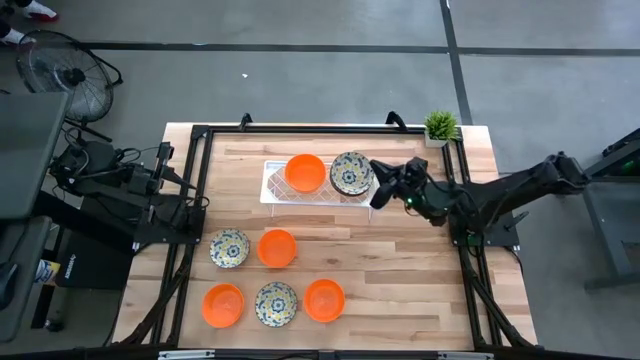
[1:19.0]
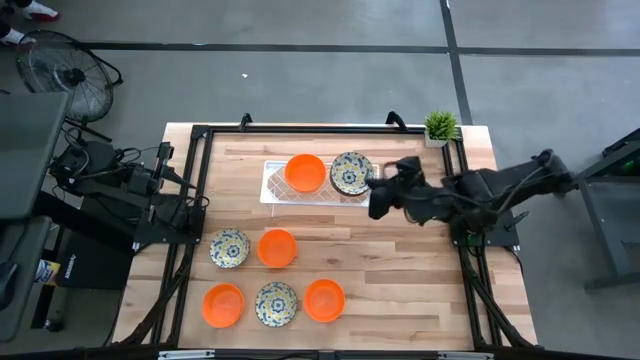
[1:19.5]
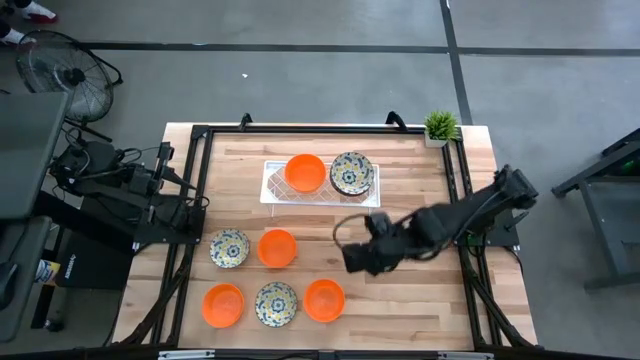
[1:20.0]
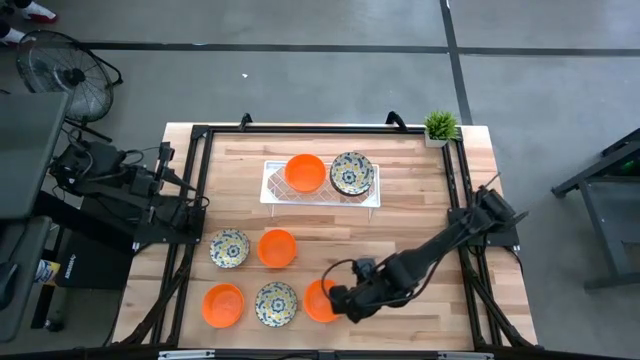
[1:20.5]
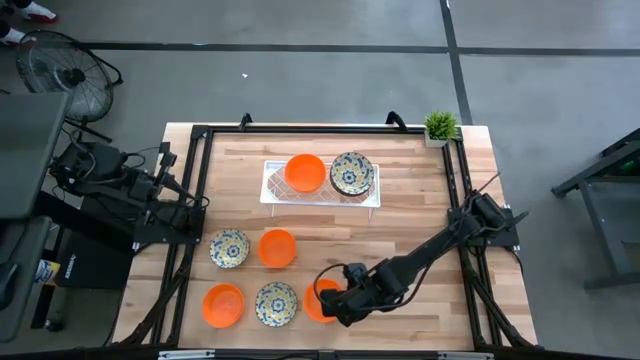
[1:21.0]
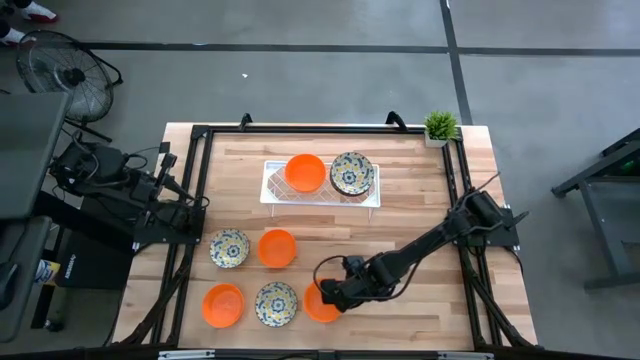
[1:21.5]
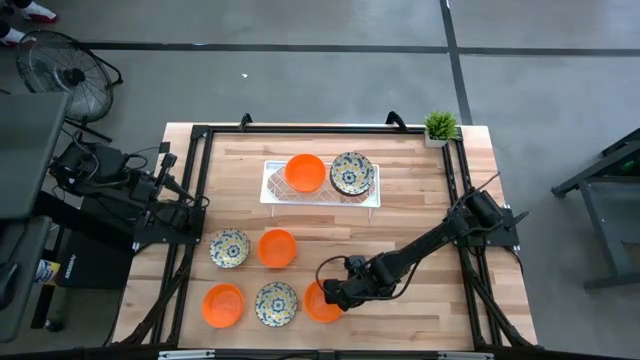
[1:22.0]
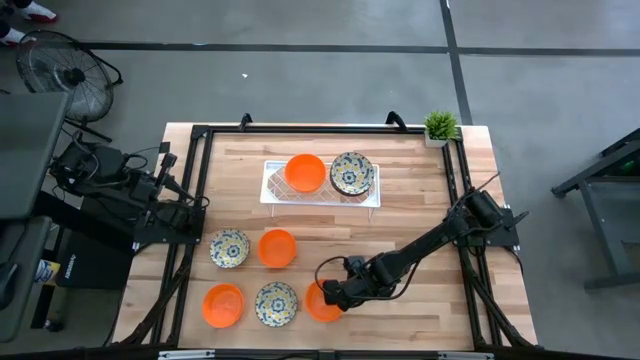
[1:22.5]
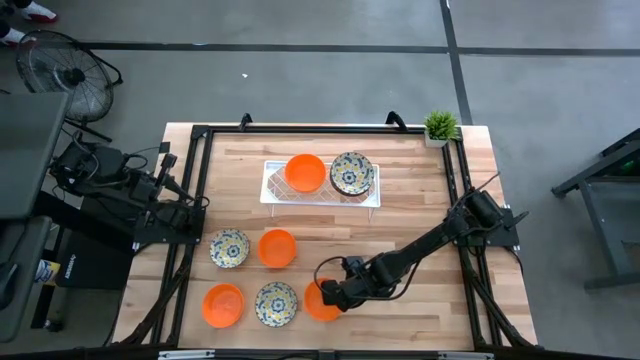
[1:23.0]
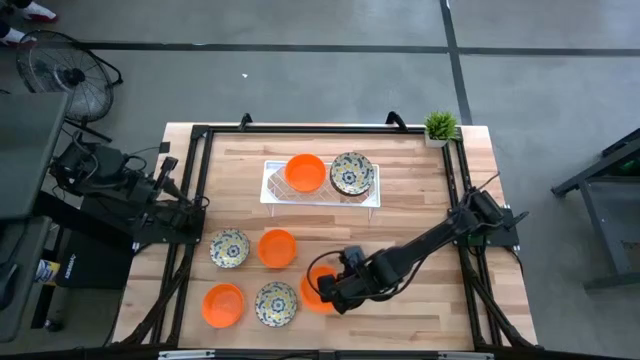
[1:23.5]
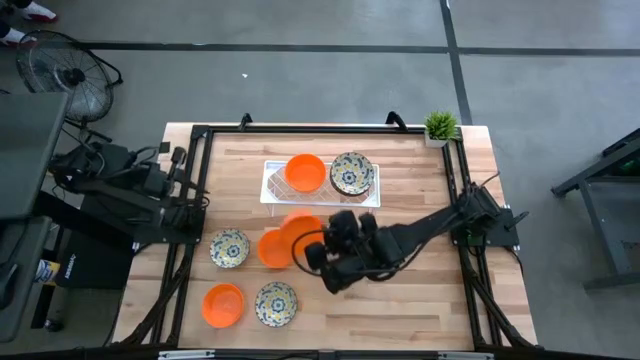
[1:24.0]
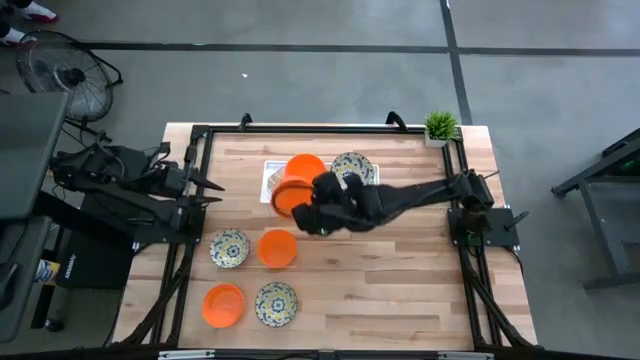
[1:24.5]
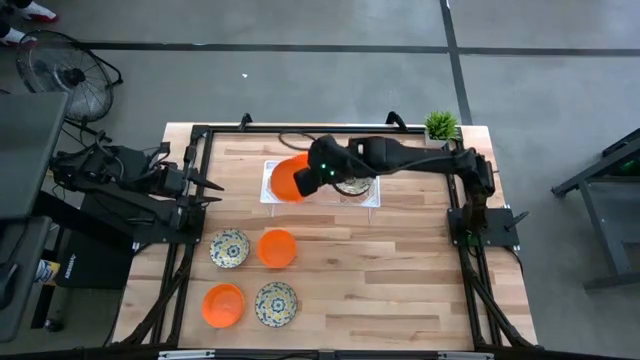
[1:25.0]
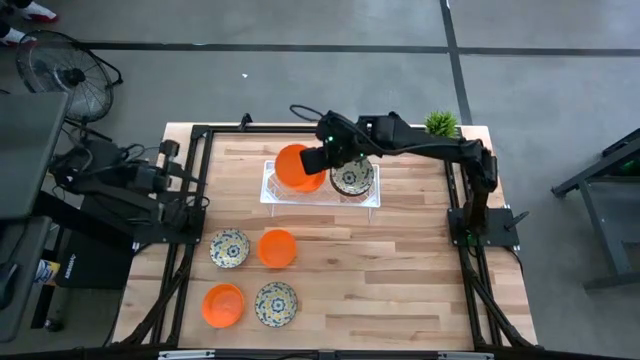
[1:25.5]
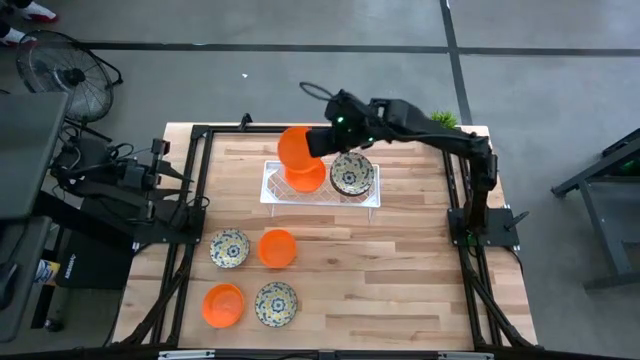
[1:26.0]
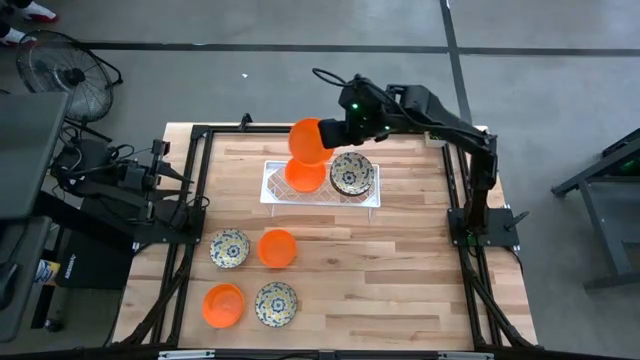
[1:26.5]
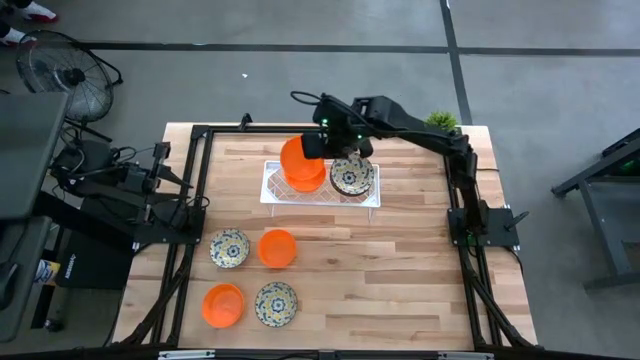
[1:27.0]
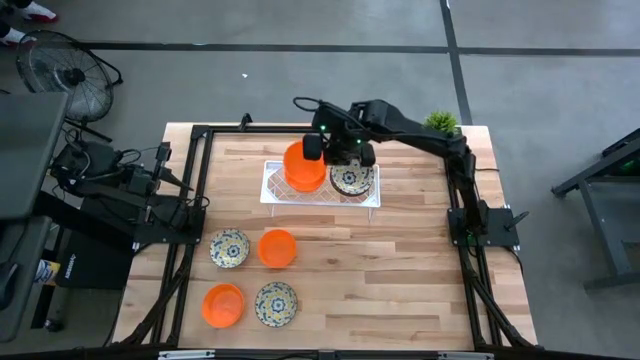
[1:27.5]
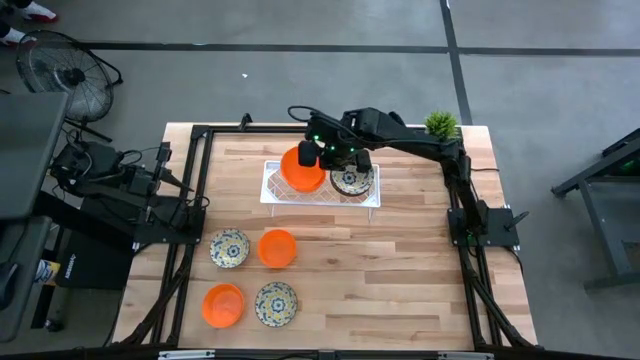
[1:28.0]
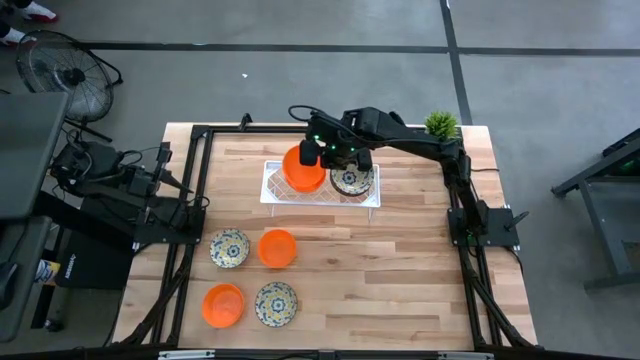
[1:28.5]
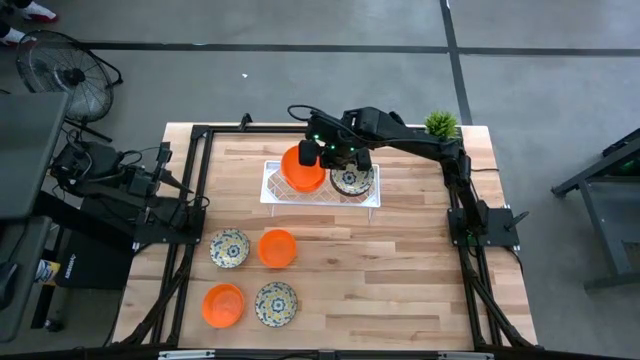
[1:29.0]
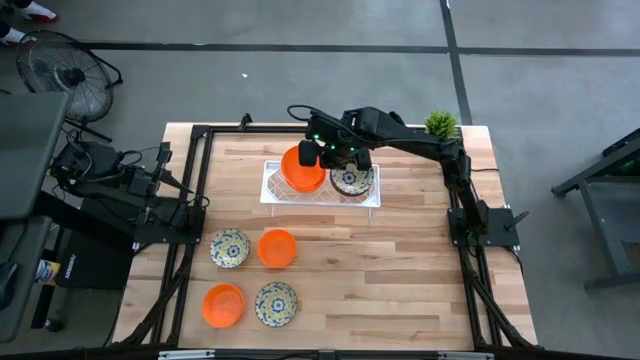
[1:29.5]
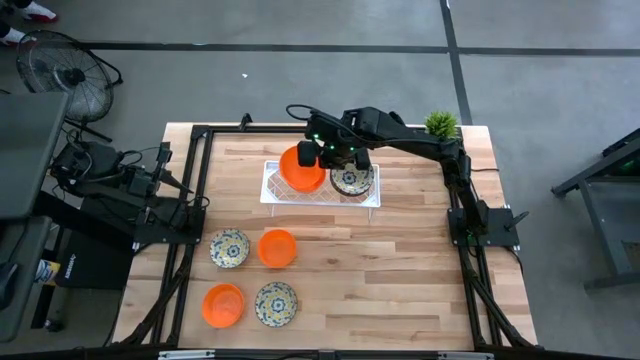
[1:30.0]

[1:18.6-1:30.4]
Task: Pick & Place Mini bowls
Stack the orange bowl on top of the other orange bowls on the shelf

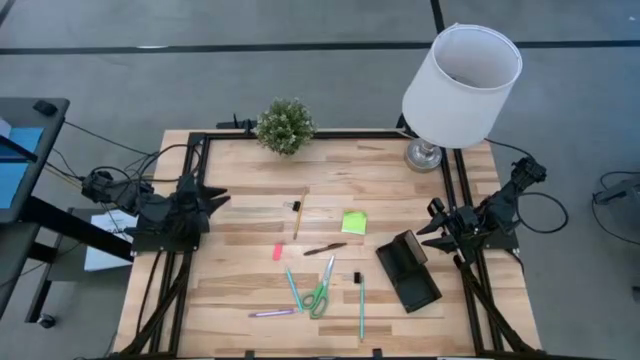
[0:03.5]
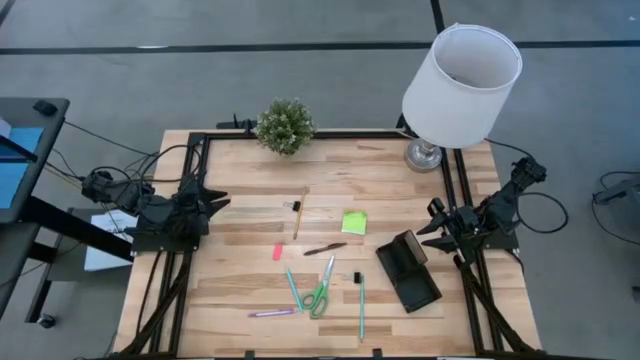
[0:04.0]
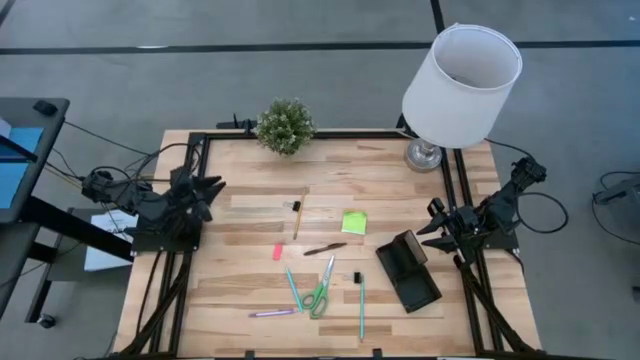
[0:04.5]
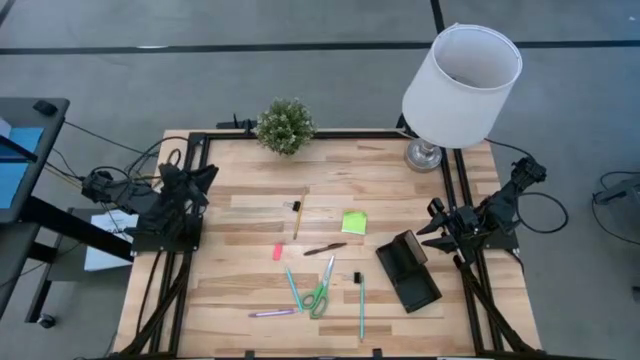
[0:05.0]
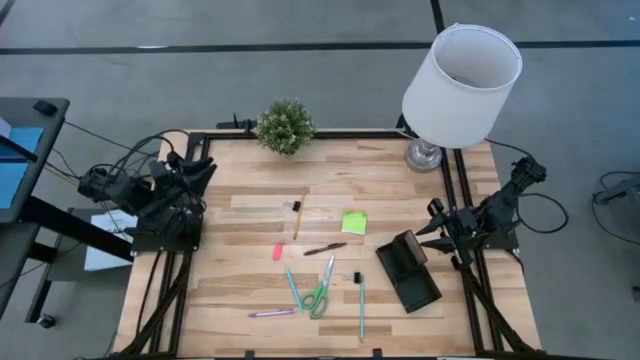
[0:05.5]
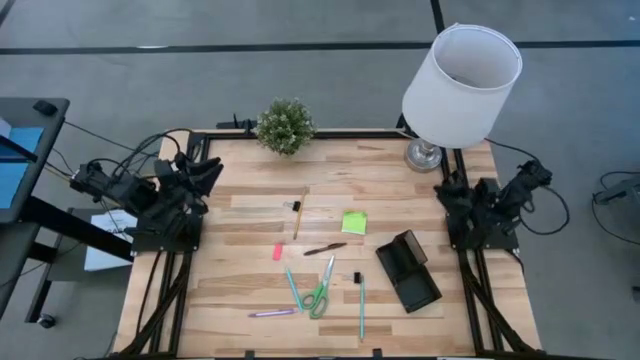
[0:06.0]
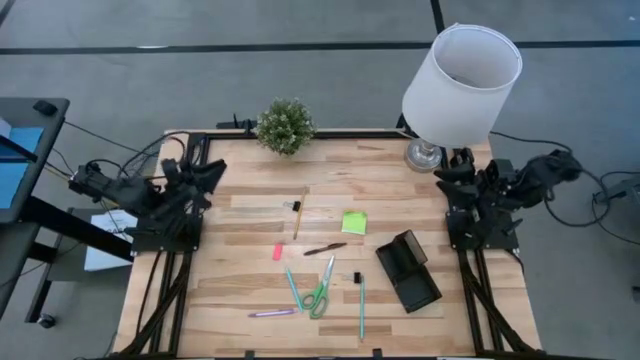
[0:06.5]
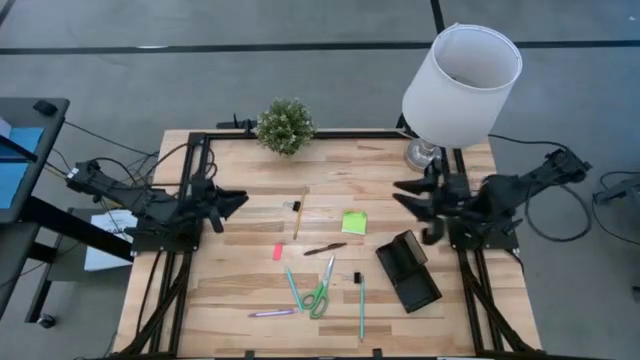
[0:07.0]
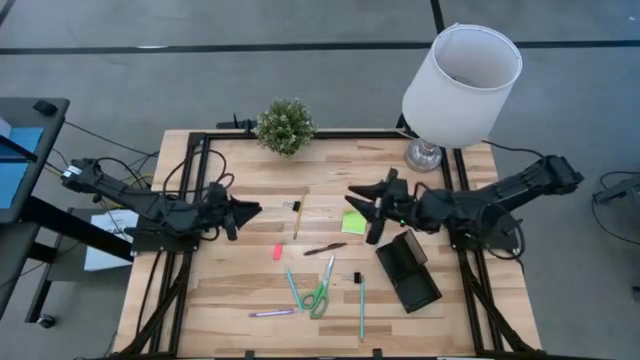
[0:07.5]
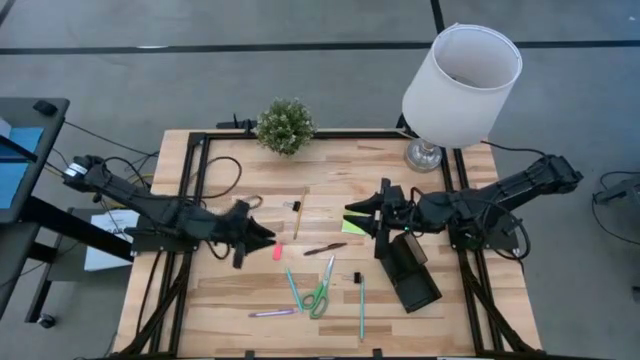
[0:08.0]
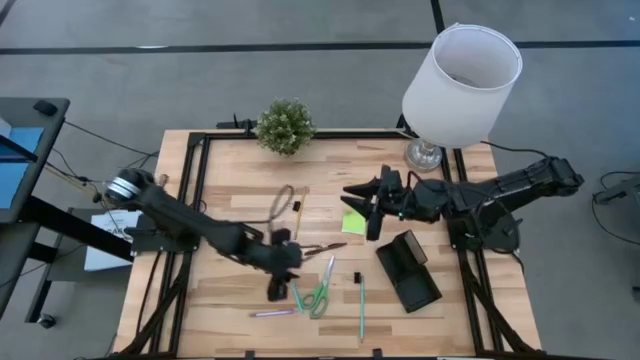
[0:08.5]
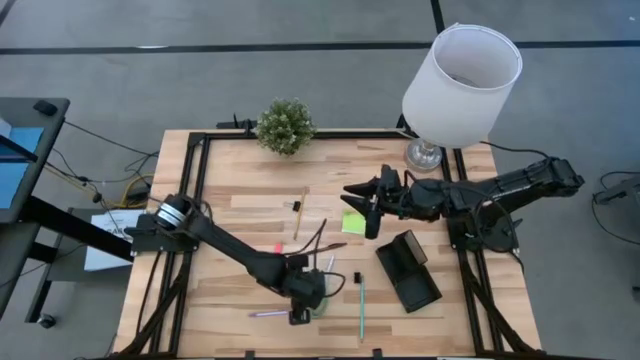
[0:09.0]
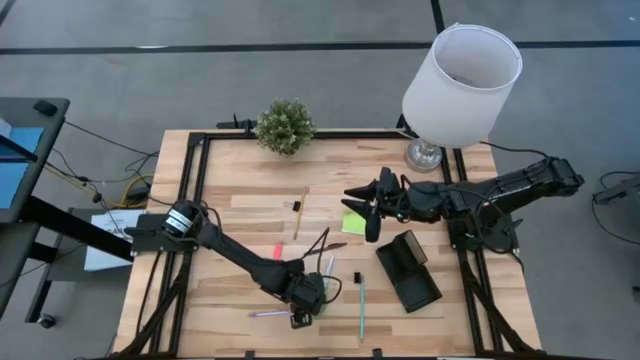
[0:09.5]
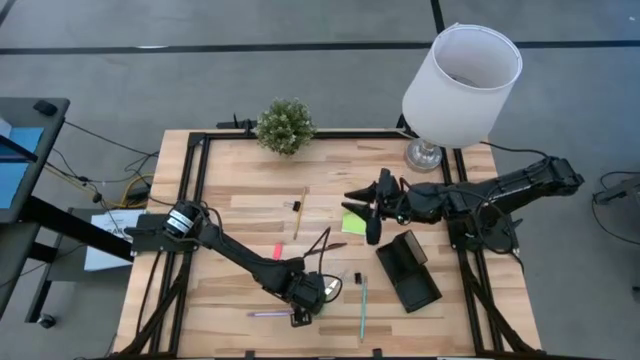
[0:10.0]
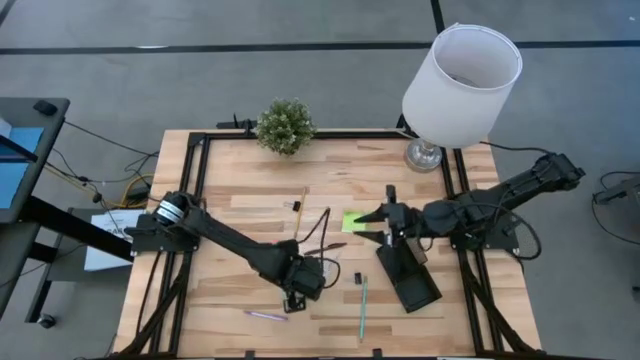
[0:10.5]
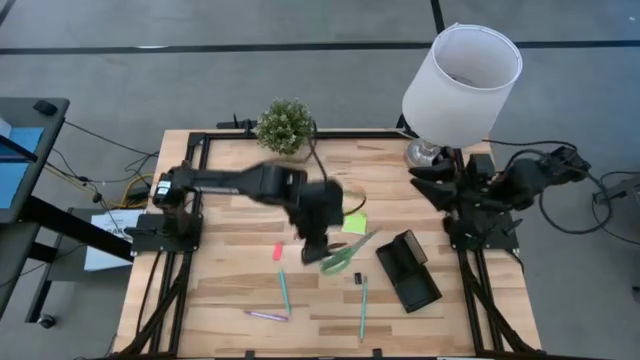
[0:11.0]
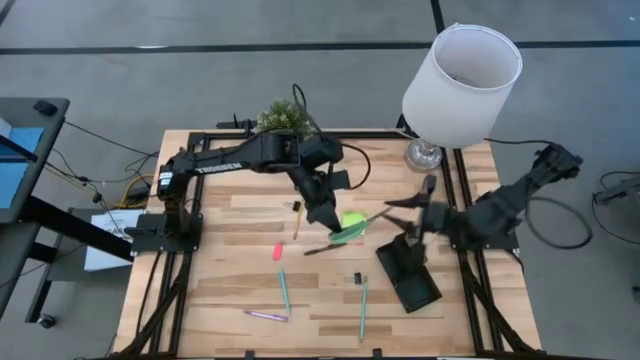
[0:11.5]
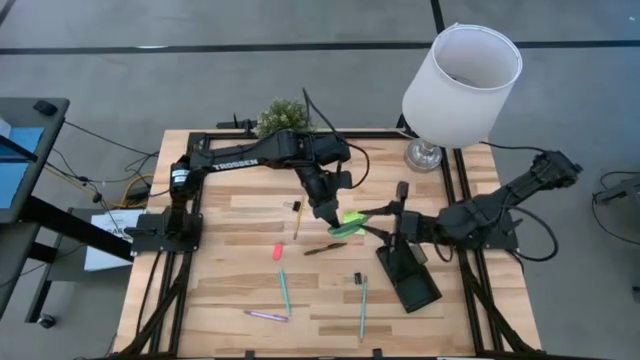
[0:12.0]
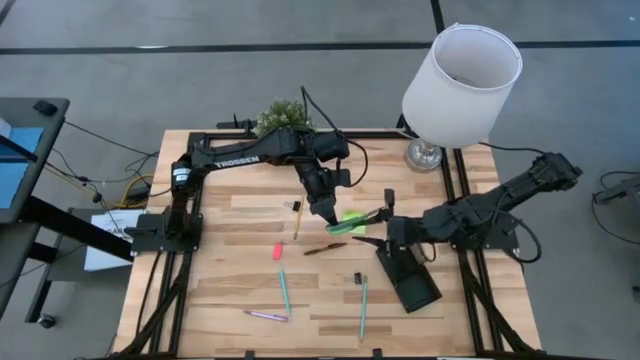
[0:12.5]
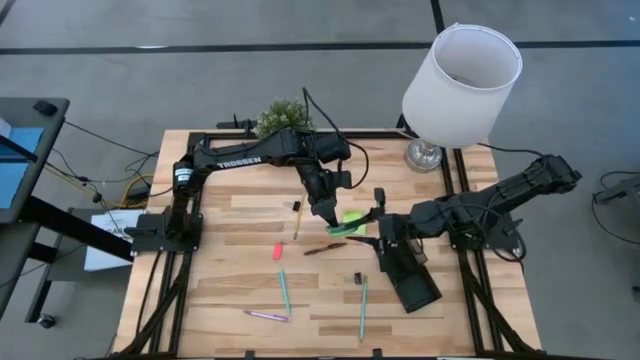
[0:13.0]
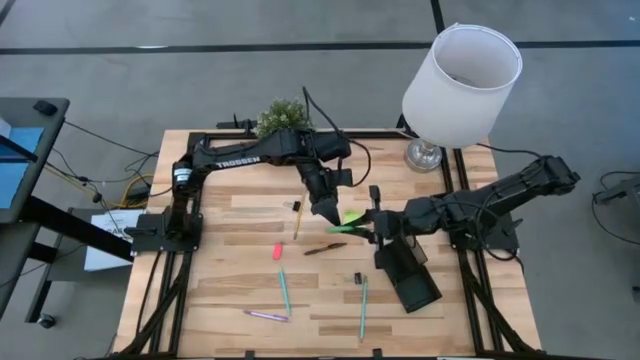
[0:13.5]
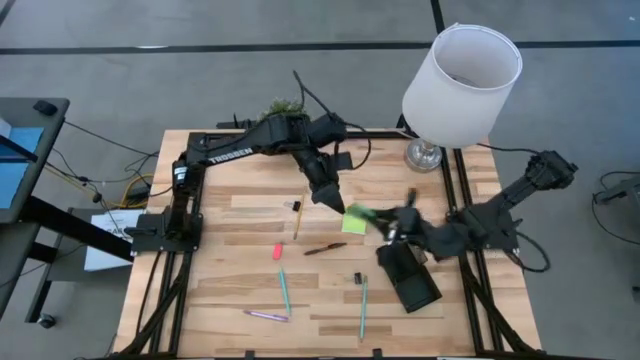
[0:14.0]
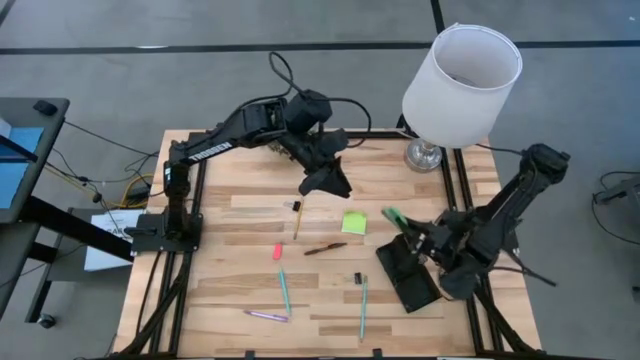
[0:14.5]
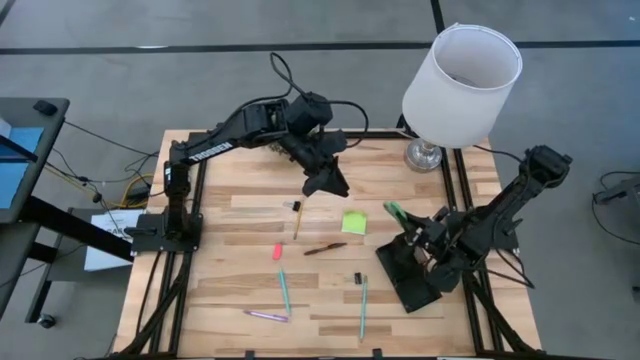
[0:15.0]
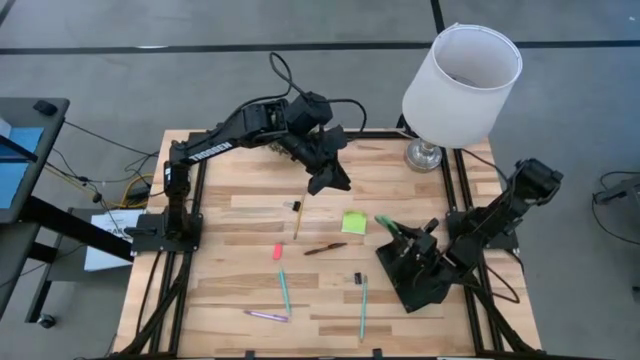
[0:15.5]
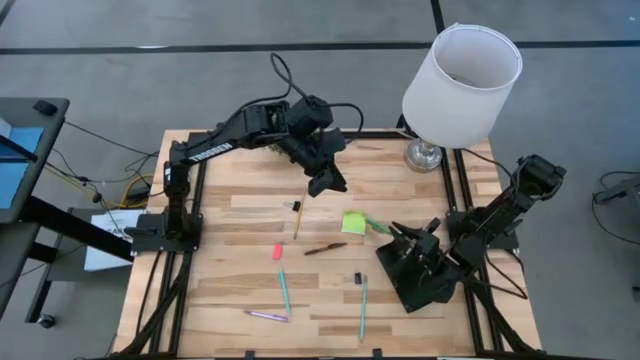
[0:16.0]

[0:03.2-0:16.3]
Task: Pick and place office supplies into organizer
Put the green scissors into the black desk organizer
